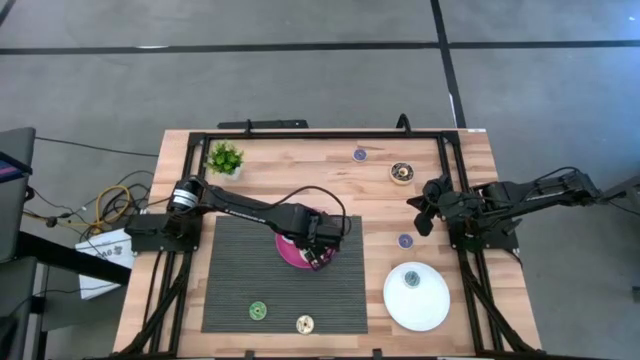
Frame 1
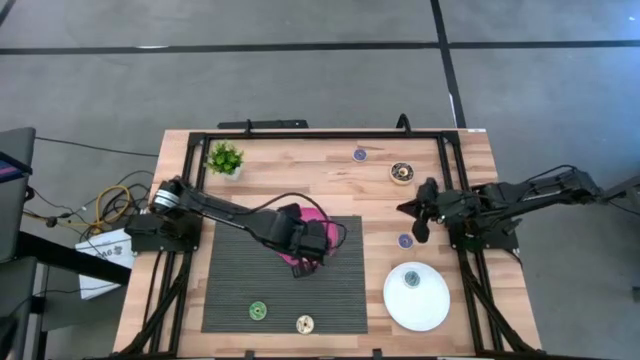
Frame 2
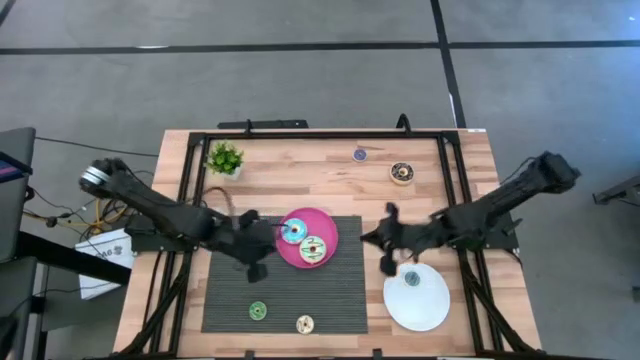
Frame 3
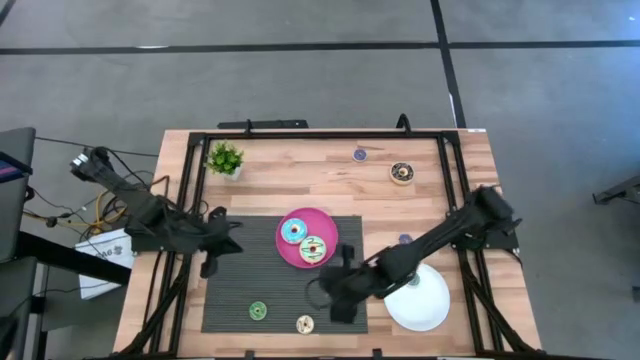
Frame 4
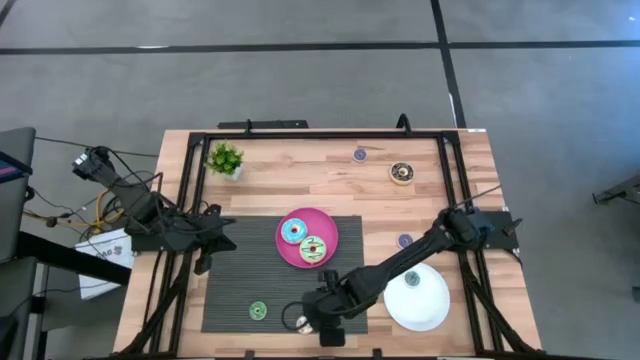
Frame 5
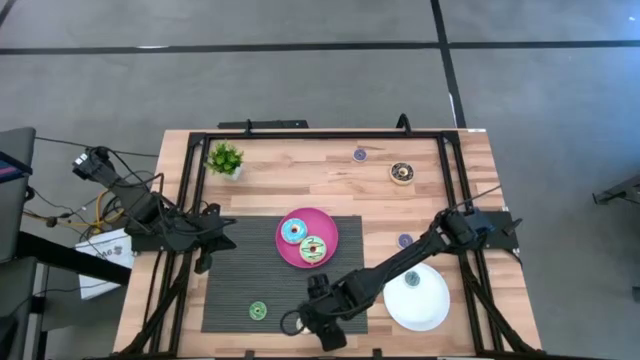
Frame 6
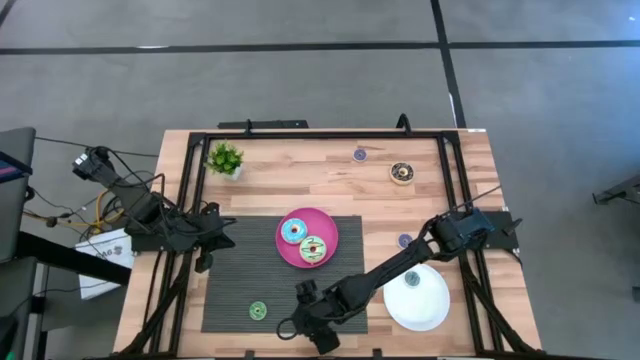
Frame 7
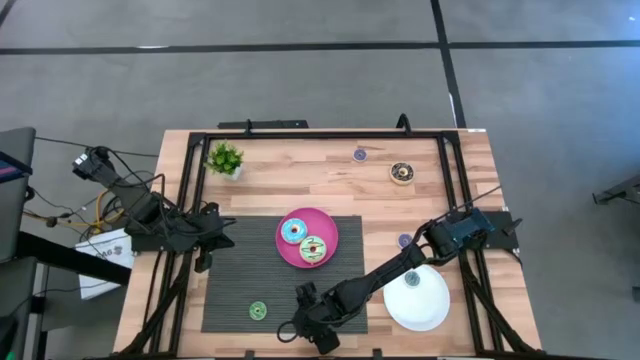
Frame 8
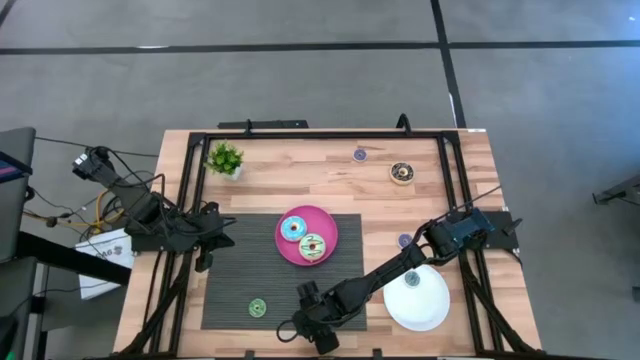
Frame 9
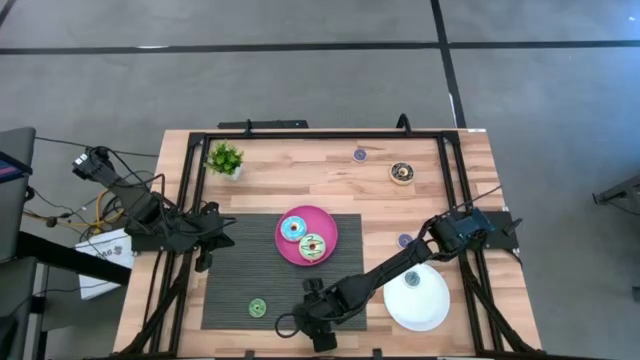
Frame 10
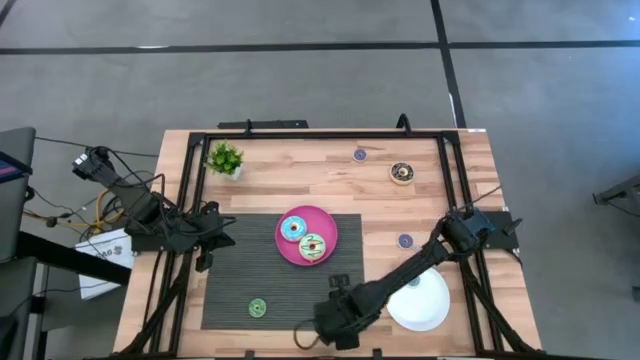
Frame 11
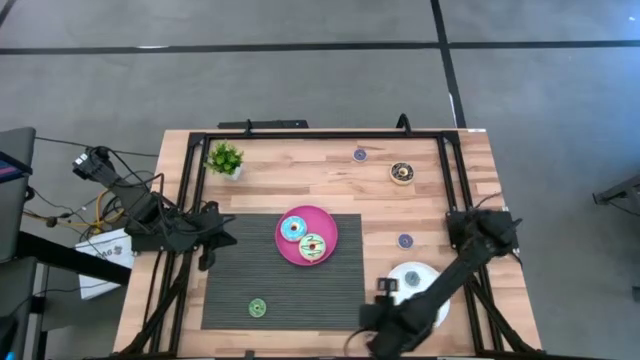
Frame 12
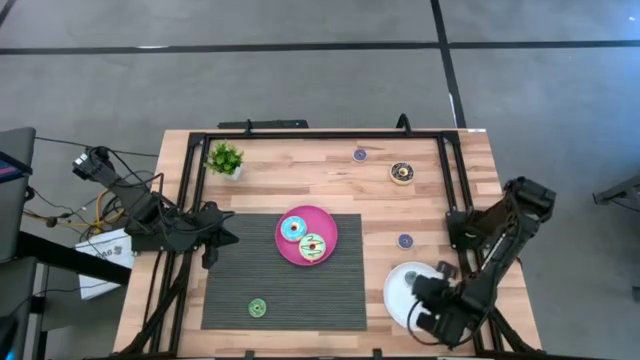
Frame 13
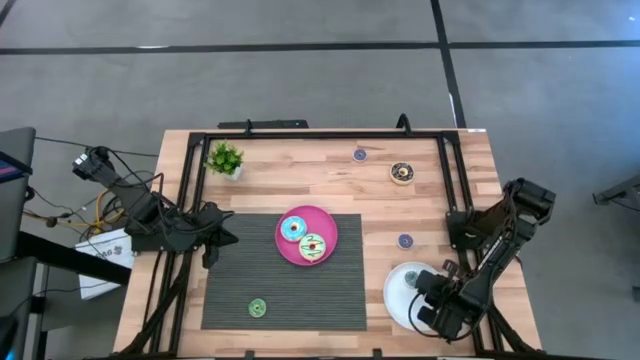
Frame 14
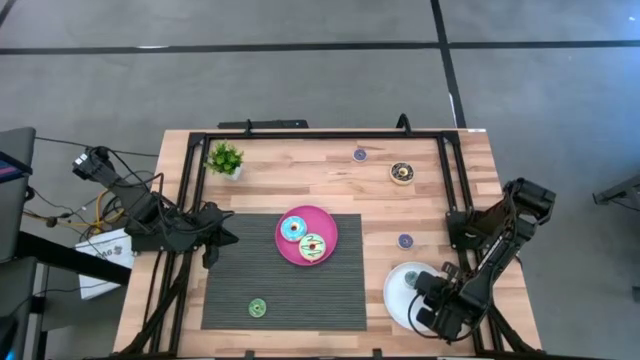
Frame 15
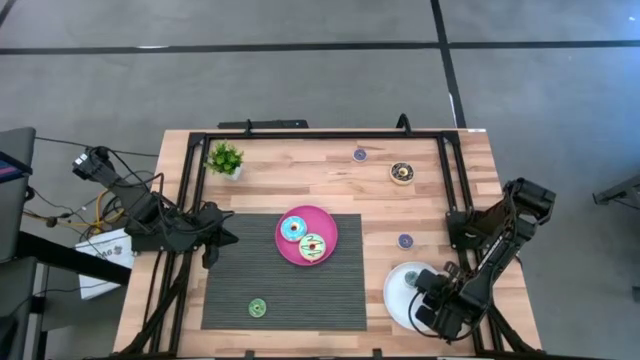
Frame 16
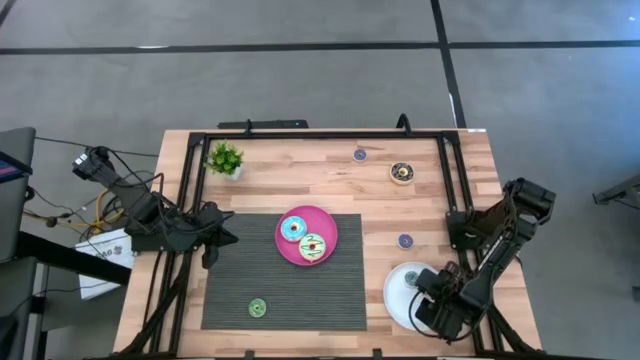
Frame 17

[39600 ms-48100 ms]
Task: Pick & Place donuts
Put the small white donut on the white plate

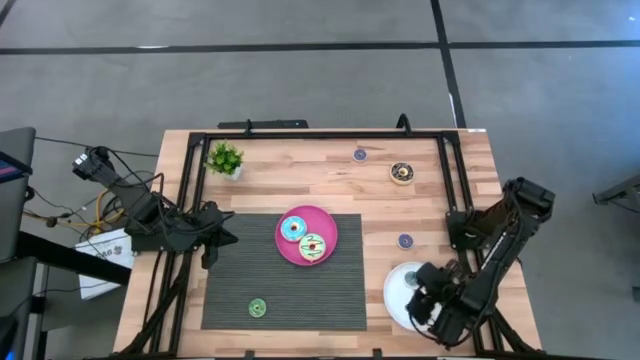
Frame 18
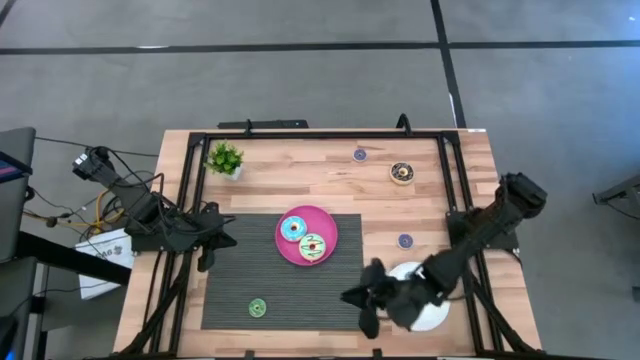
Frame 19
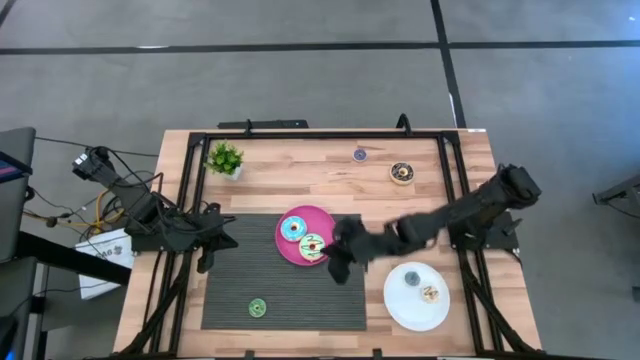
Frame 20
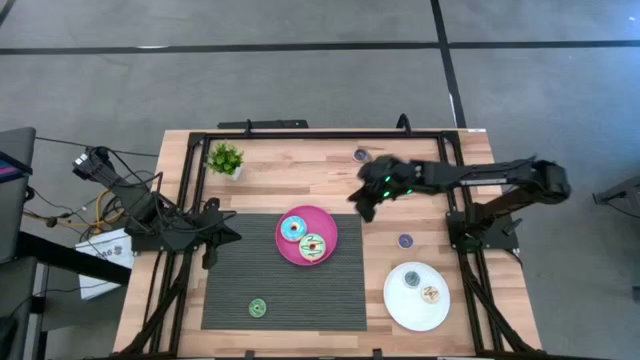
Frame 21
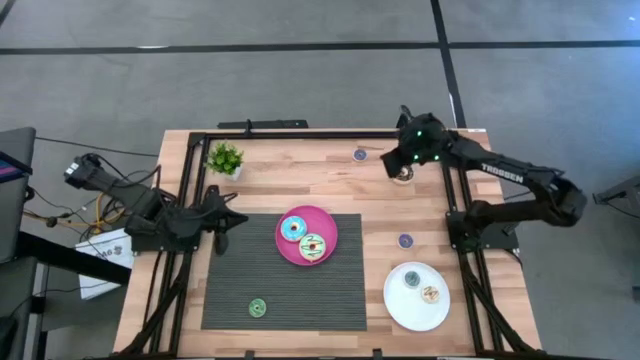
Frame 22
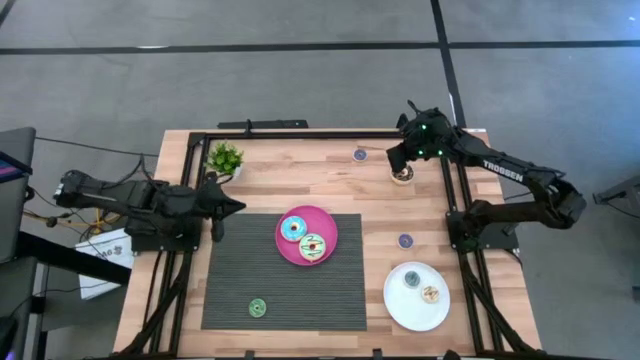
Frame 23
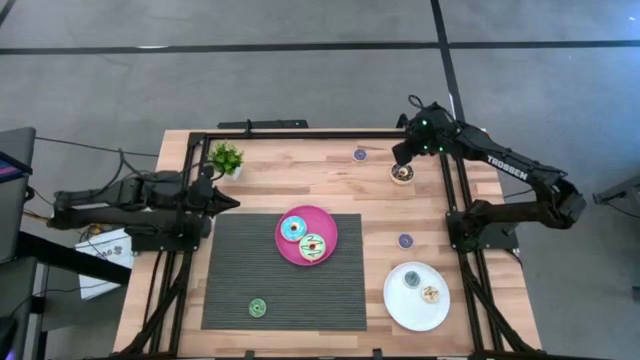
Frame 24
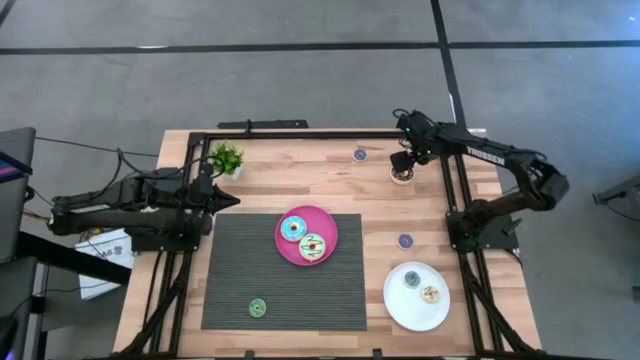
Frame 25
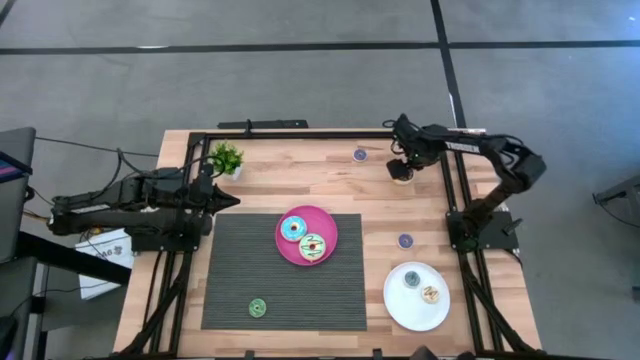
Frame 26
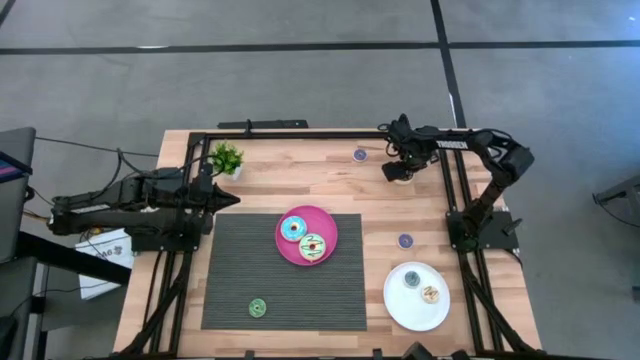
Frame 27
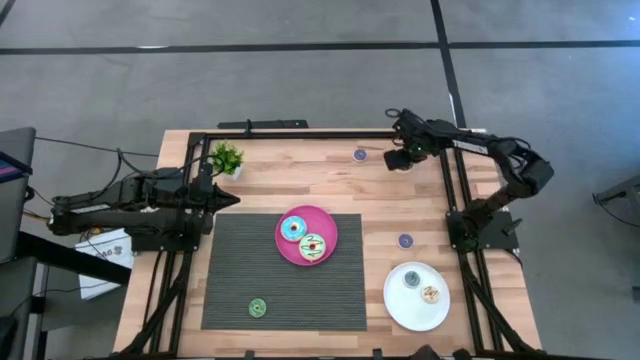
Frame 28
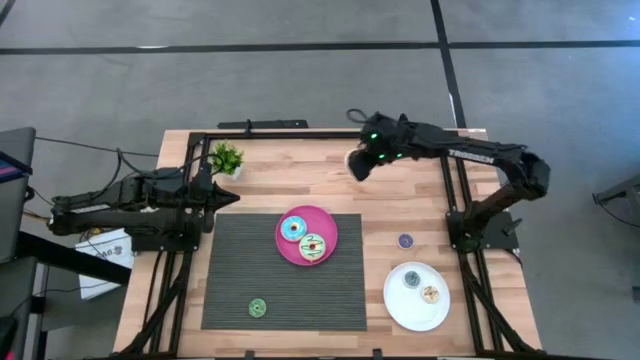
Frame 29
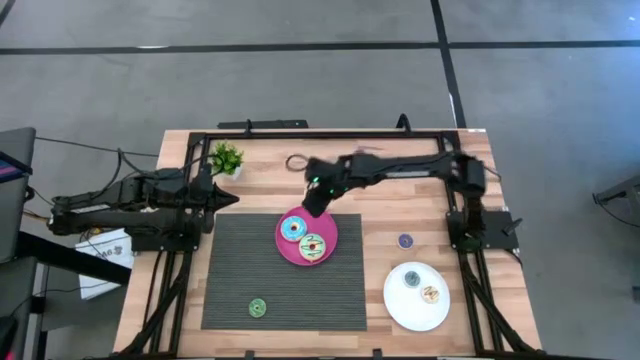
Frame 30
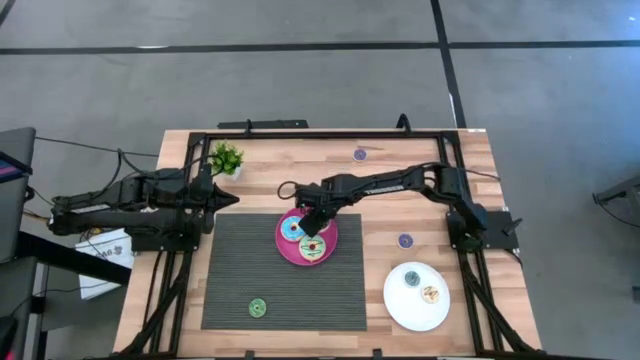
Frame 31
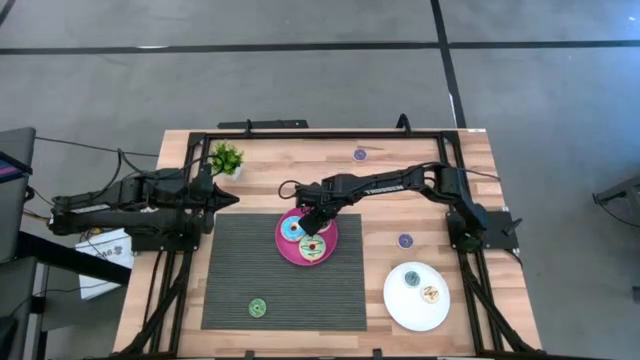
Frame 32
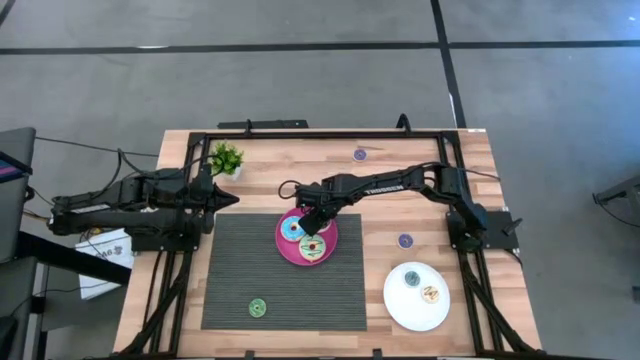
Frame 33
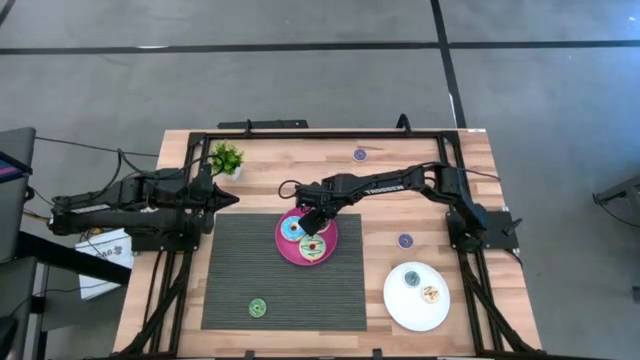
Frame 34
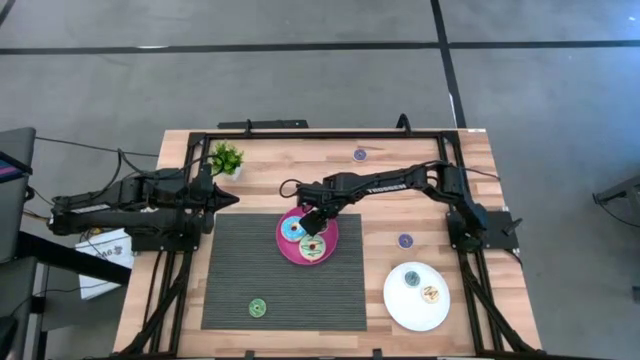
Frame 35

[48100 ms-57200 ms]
Put the large black donut on the pink plate

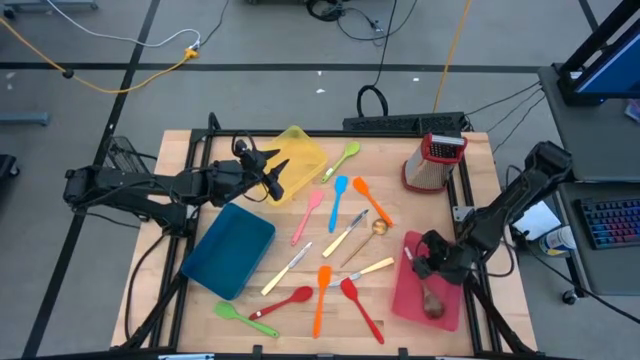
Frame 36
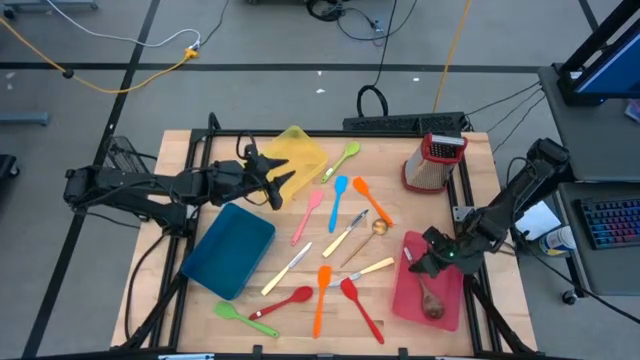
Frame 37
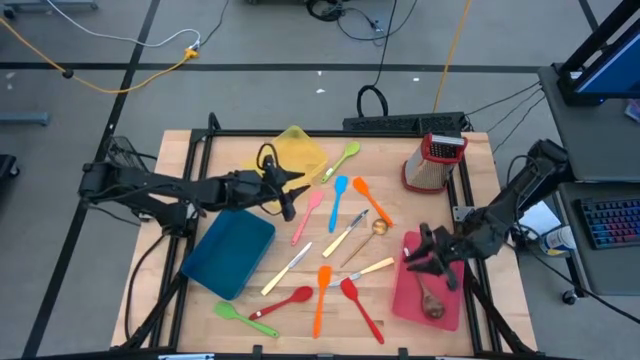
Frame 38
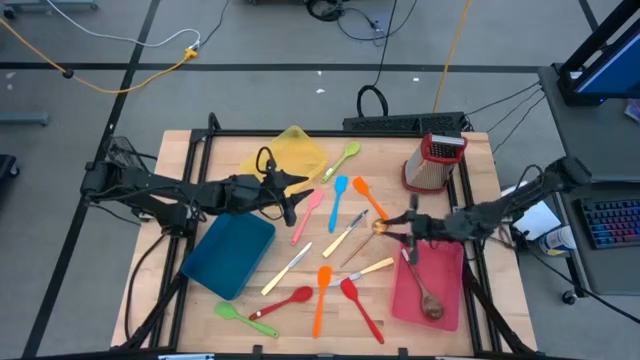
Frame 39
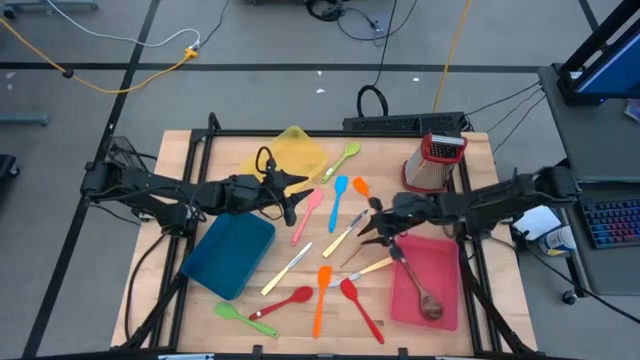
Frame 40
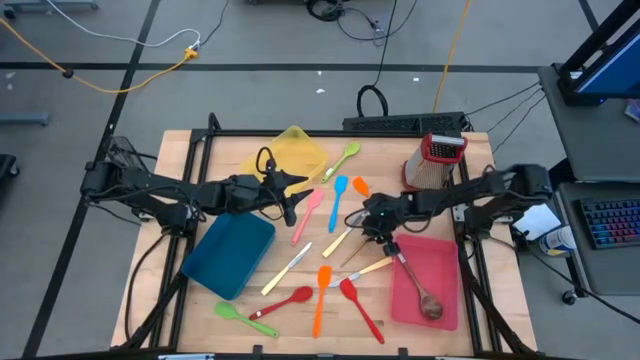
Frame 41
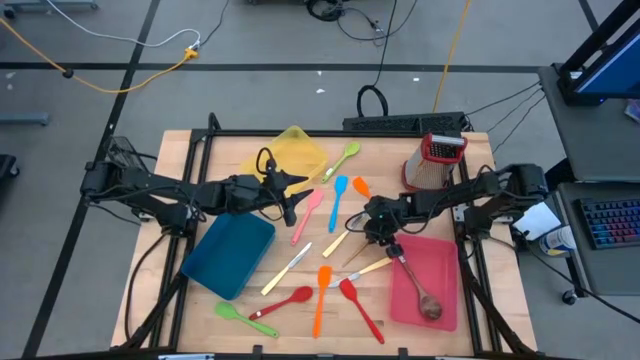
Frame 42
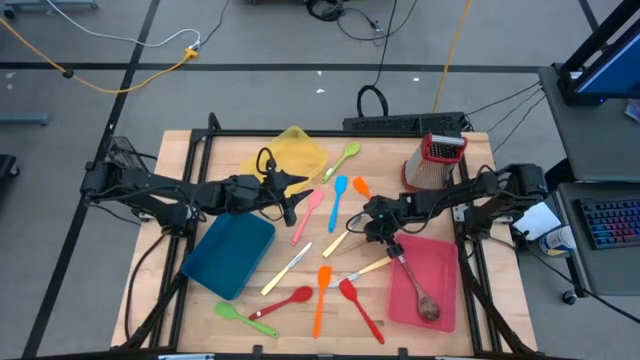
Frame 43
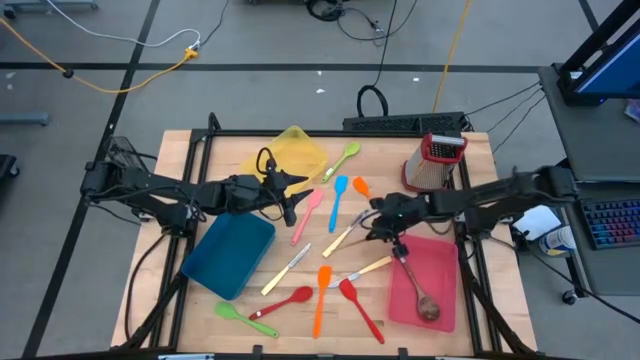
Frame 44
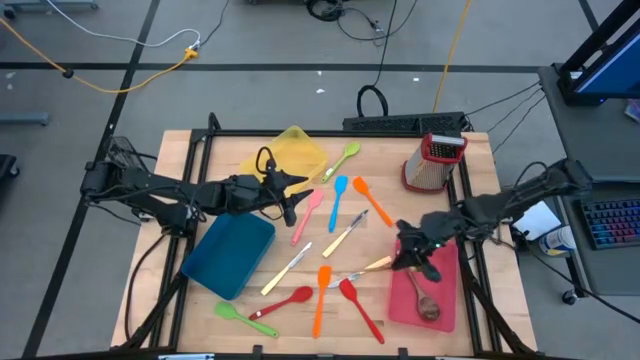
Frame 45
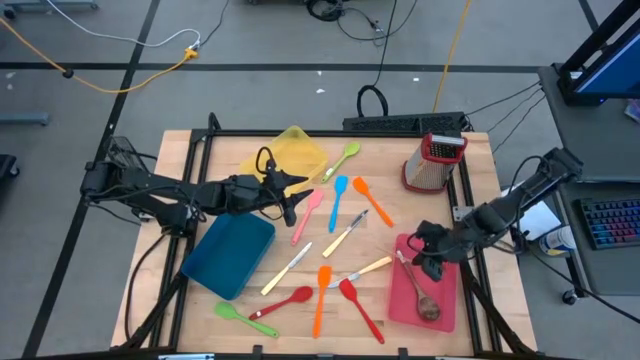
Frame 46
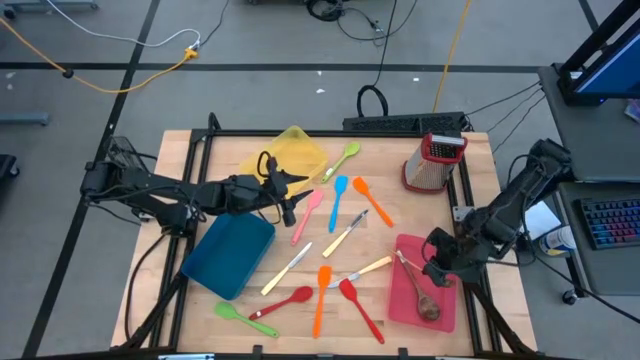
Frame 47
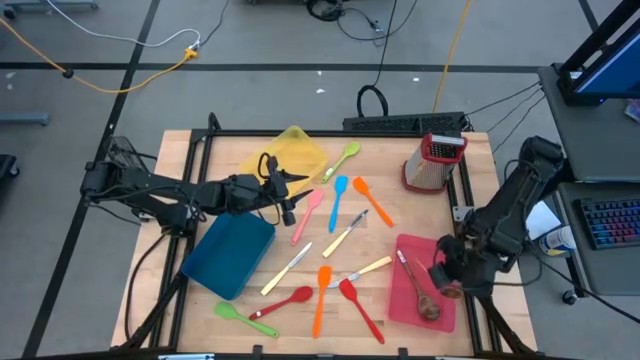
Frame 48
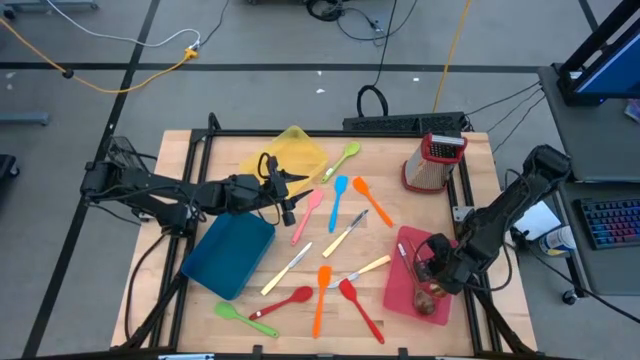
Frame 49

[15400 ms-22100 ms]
Task: Pick & Place Kitchen Items
Put the gold serving spoon into the pink bin
